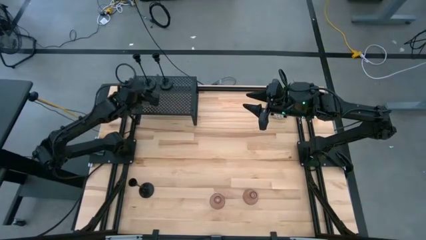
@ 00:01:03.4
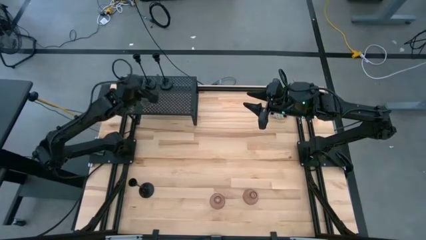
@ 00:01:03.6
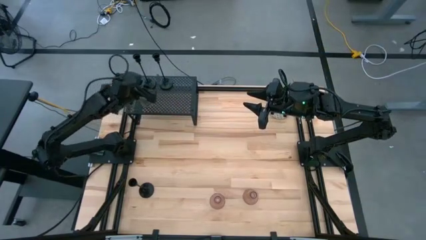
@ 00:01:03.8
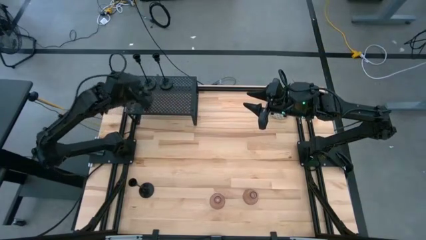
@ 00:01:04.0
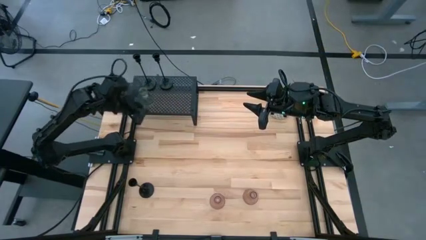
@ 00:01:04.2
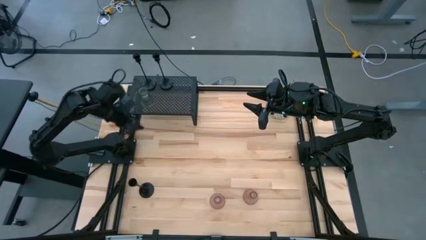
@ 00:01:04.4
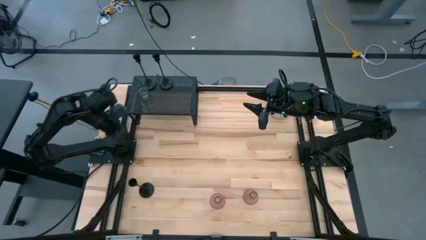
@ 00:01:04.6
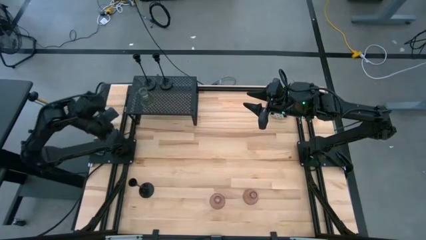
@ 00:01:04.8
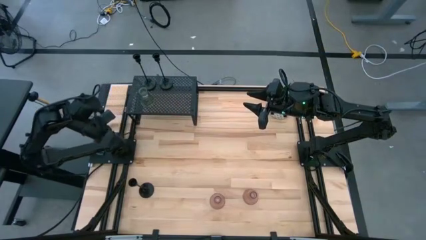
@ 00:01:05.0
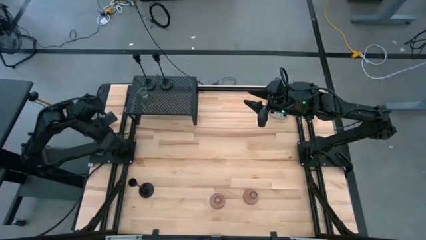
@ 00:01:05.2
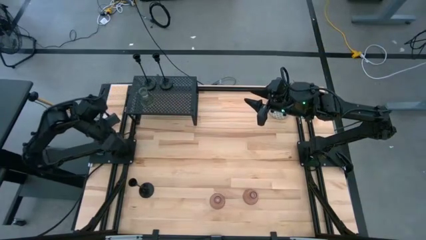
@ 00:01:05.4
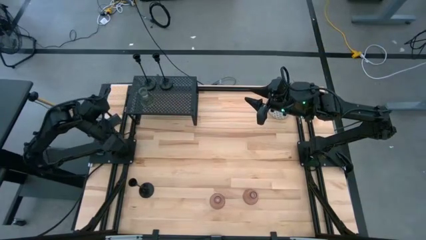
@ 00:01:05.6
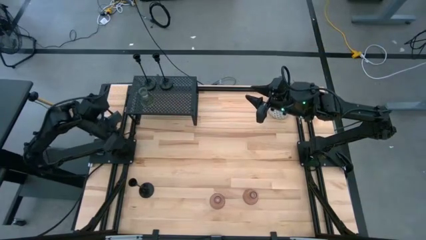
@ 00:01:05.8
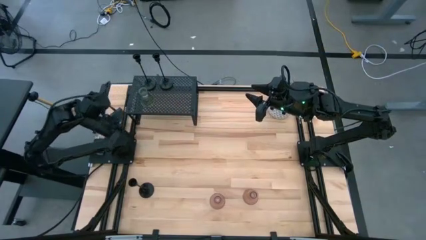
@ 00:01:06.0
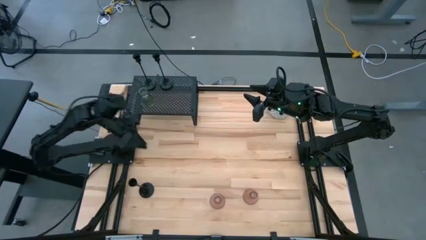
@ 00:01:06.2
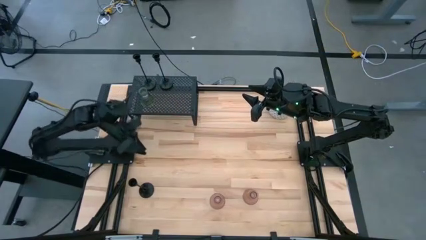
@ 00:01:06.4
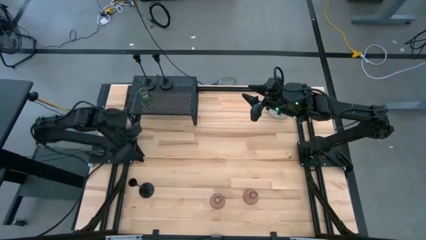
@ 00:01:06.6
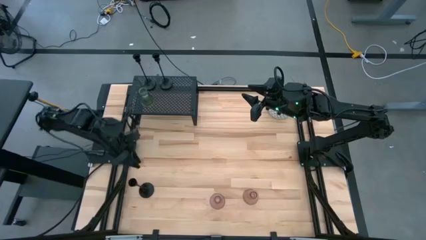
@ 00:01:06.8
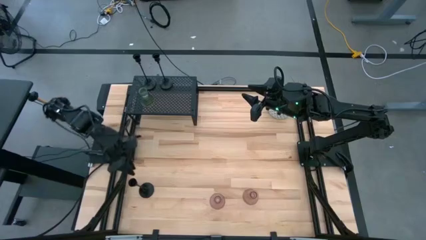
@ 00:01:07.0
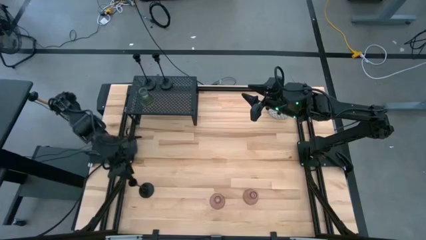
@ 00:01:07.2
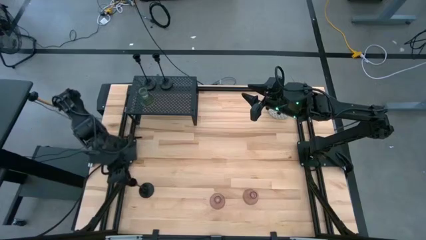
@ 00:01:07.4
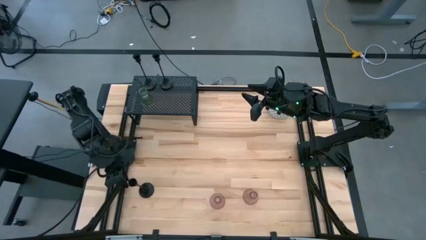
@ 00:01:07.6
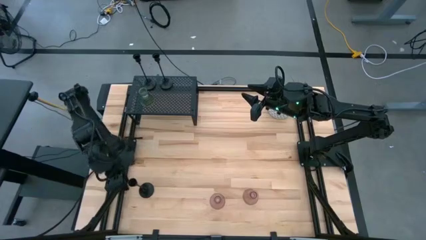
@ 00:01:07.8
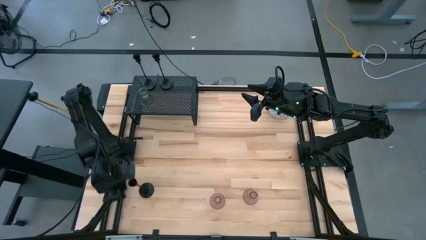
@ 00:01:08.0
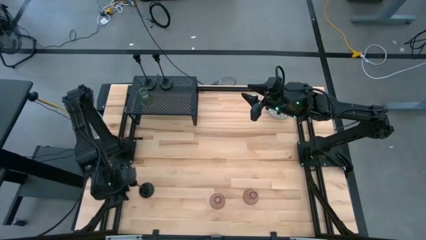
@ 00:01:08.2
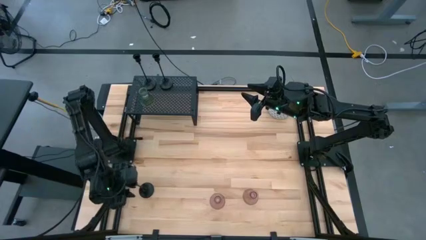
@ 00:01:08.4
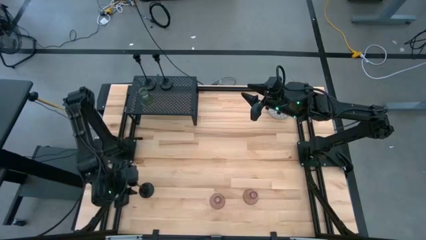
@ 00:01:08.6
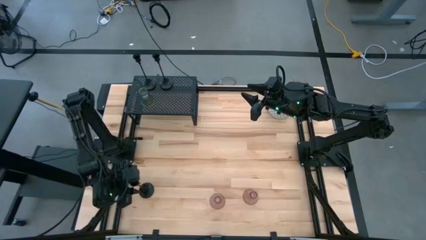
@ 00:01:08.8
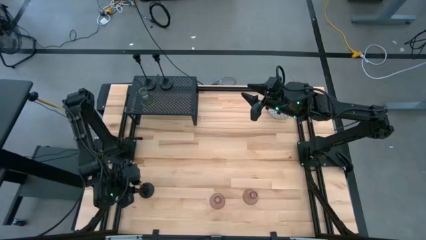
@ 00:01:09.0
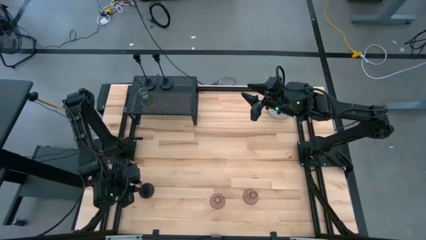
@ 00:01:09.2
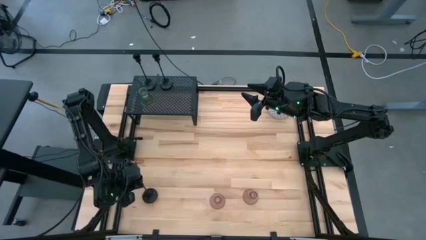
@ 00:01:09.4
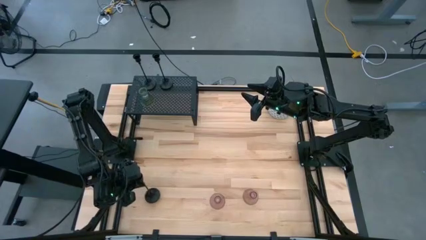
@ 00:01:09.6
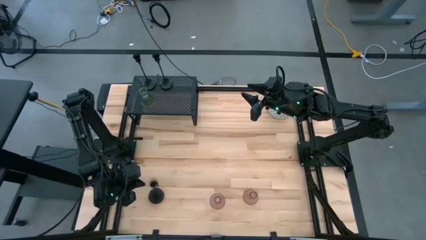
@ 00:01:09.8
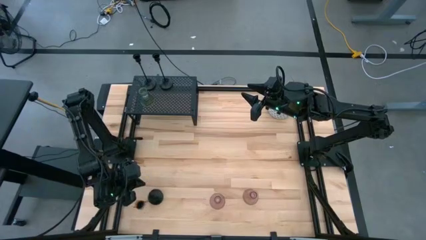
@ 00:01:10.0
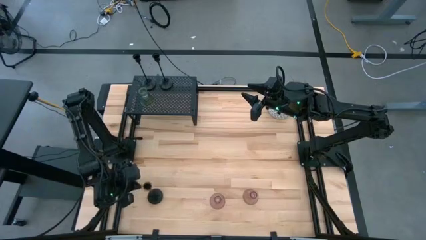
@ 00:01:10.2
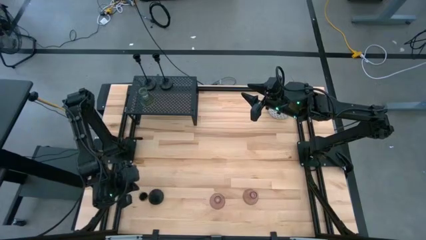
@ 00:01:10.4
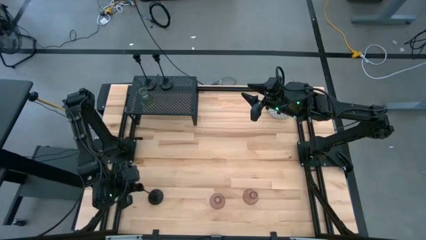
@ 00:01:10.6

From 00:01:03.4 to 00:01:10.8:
Task: Pick & Place candle stick holders
Put the black candle holder on the shelf aligned with the other black candle holders

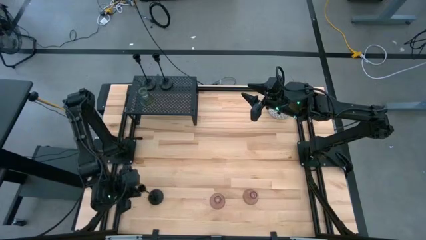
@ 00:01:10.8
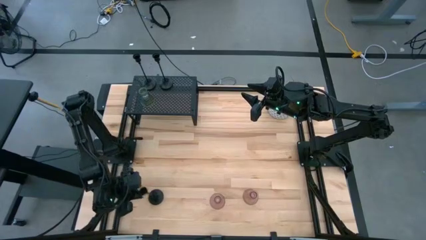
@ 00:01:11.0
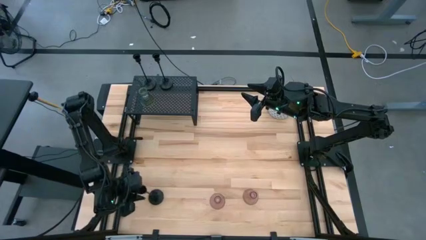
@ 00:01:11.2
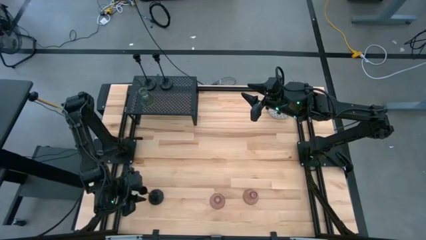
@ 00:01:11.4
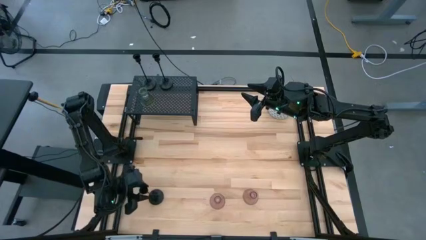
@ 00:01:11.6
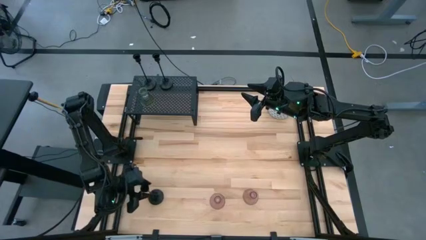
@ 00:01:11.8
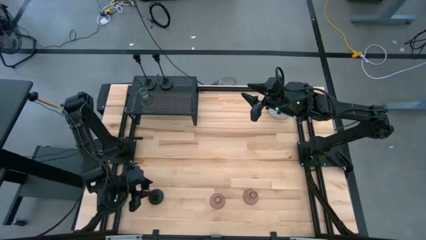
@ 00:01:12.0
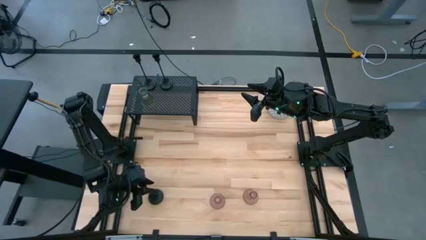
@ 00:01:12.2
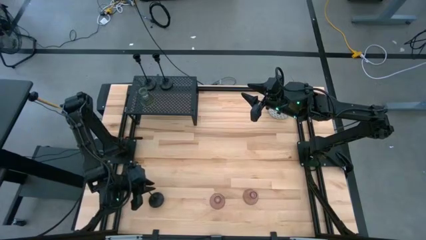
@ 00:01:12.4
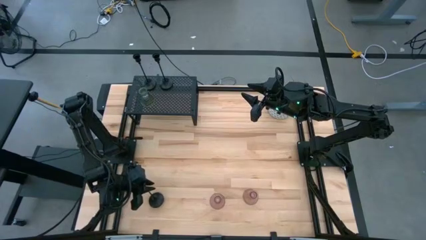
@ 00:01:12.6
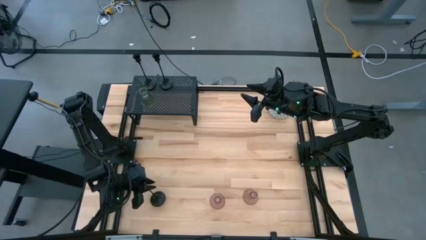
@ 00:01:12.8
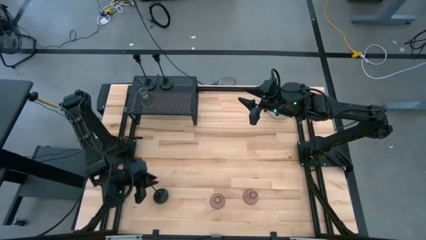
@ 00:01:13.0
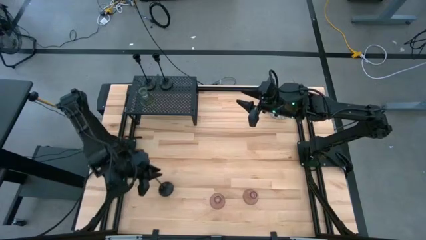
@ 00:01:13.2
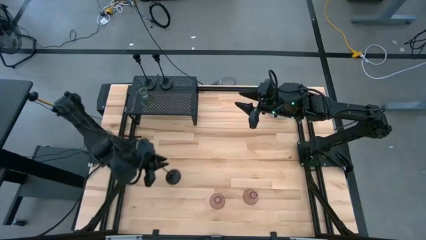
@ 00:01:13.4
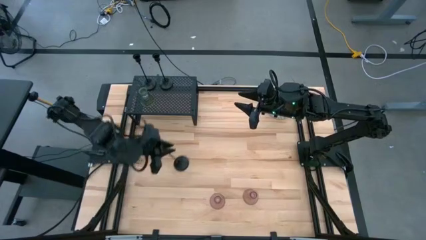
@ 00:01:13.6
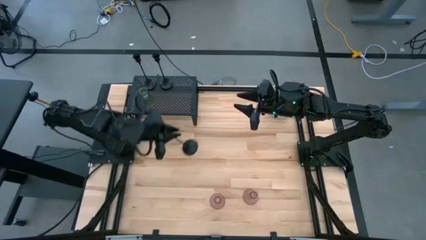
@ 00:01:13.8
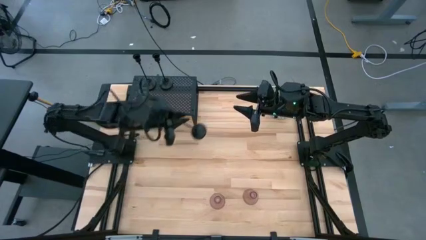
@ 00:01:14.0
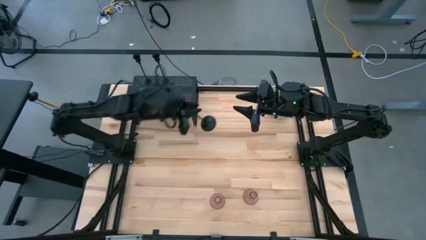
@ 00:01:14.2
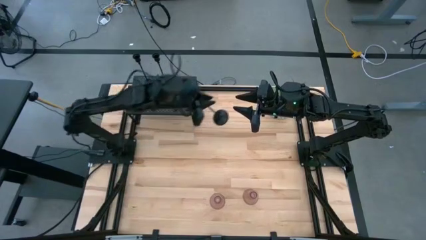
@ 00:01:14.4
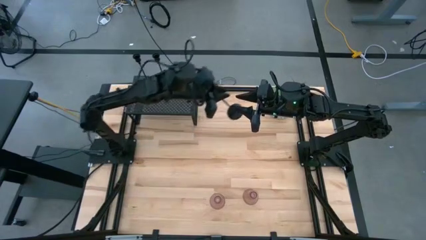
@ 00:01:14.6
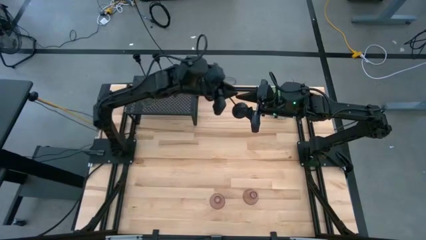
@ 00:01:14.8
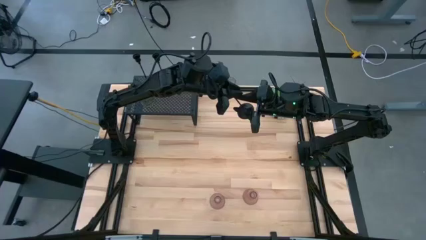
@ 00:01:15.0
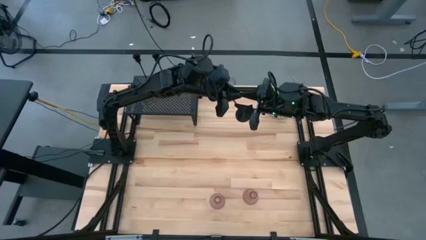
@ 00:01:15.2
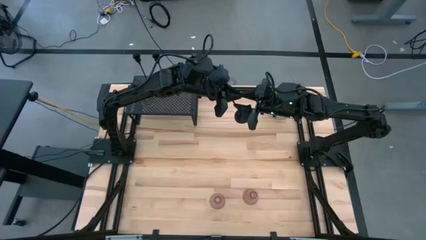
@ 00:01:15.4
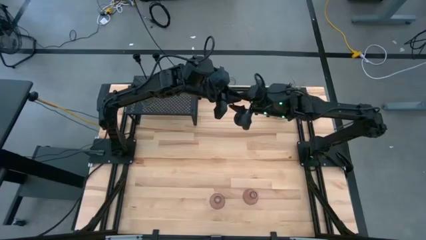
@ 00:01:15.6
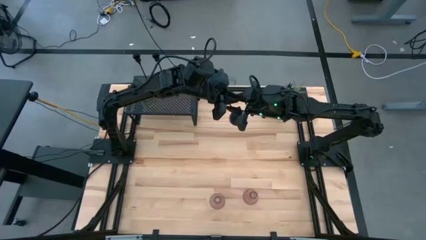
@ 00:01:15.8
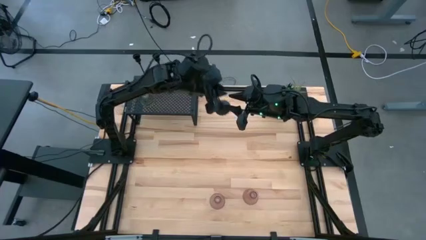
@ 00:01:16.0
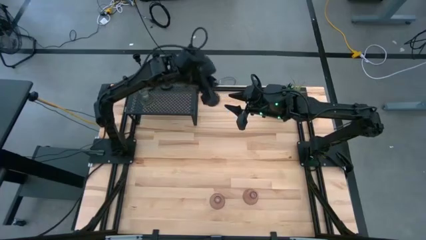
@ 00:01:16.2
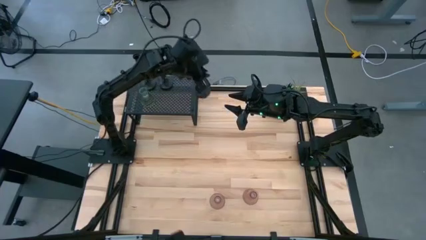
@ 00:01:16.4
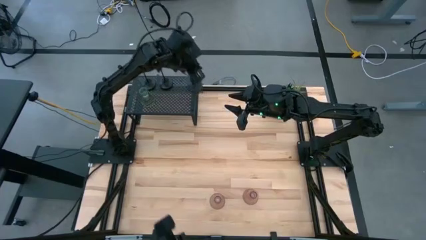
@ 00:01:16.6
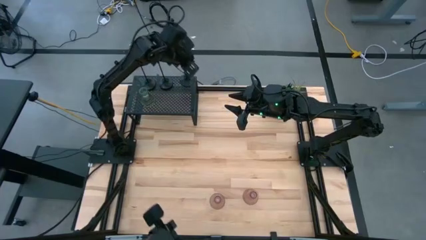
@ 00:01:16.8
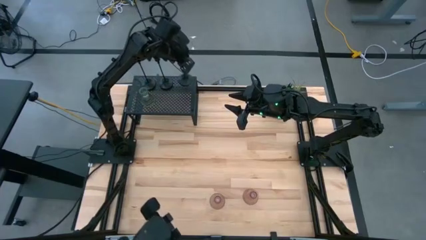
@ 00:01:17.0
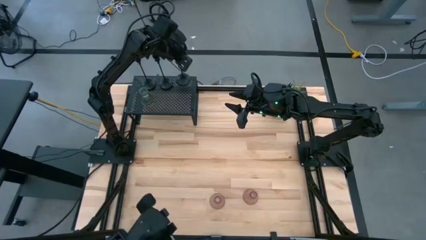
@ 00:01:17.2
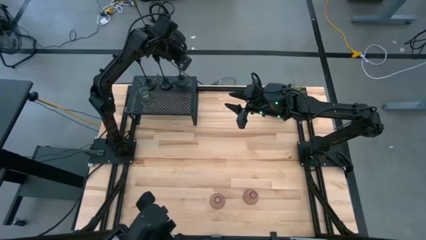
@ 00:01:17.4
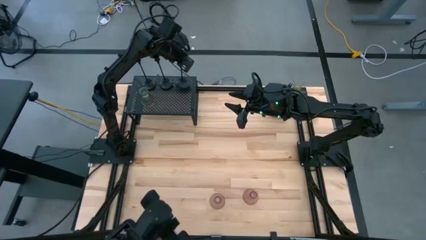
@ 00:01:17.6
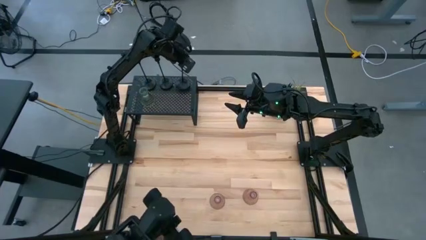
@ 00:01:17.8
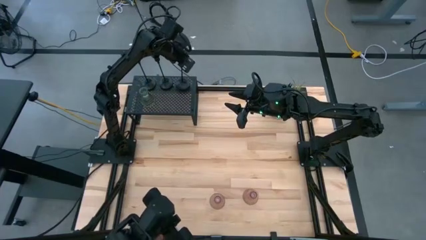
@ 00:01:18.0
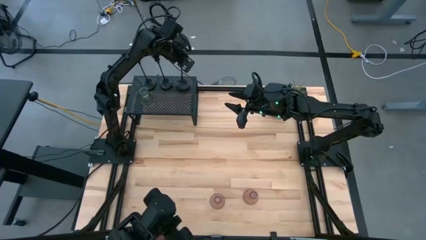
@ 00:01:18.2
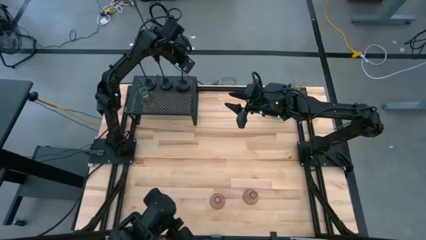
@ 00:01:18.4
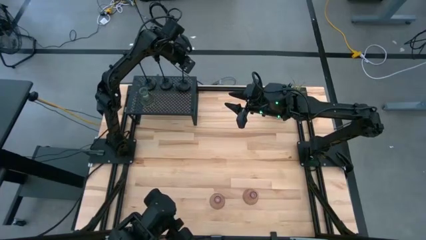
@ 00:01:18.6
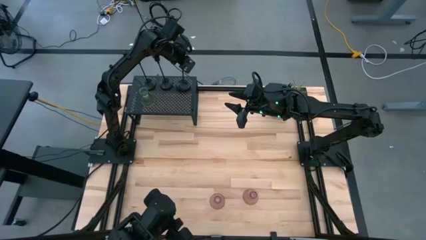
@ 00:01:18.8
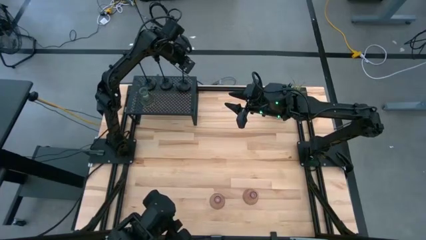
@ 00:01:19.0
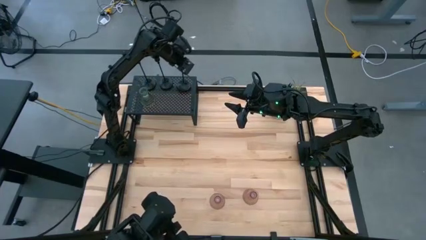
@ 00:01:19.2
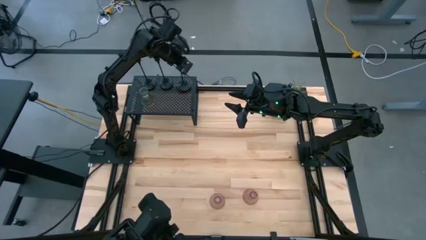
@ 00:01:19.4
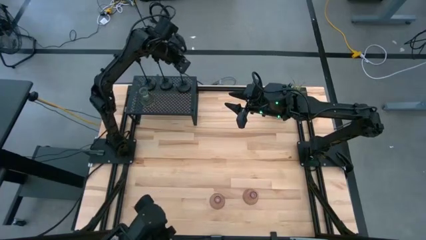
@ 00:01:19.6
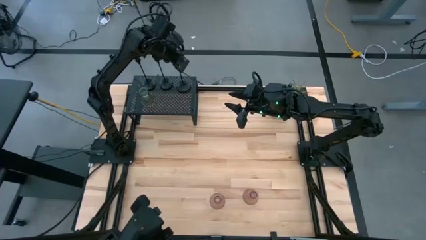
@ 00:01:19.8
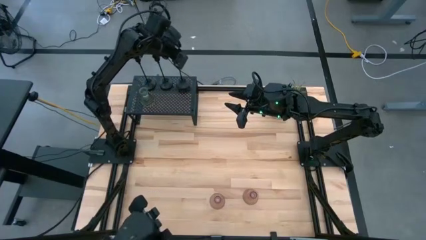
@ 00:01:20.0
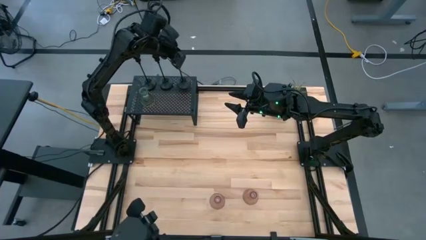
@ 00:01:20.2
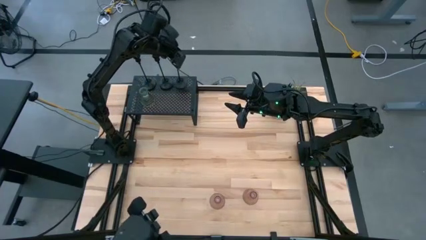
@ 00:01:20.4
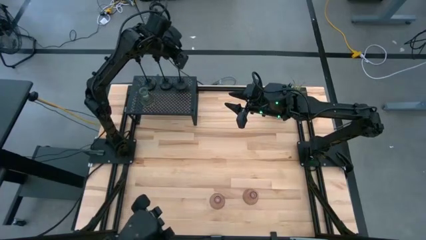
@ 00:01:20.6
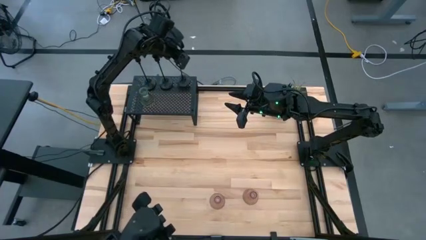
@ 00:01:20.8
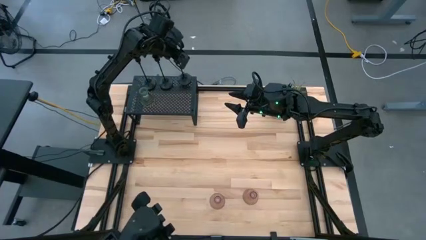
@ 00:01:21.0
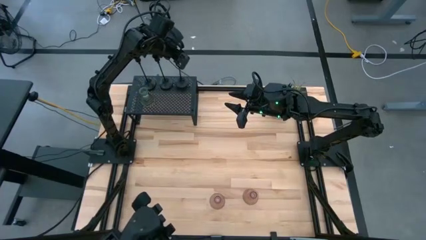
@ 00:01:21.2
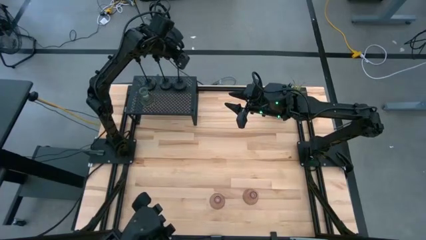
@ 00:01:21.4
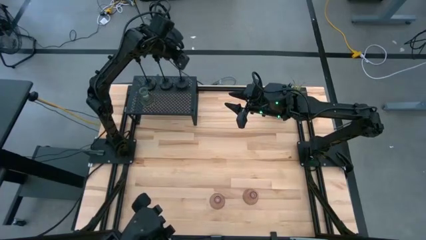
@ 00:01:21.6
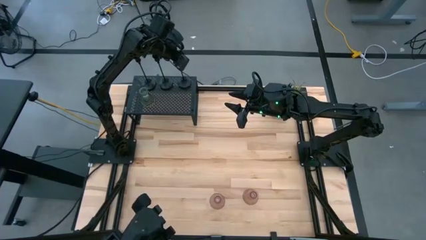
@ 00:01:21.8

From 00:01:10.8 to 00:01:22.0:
Put the black candle holder on the shelf aligned with the other black candle holders
